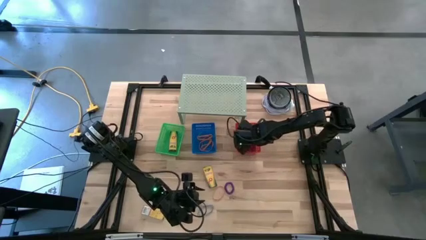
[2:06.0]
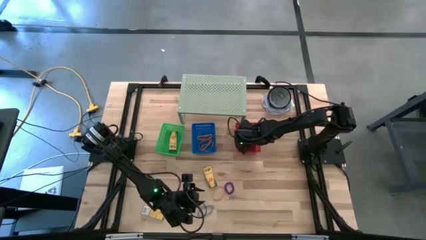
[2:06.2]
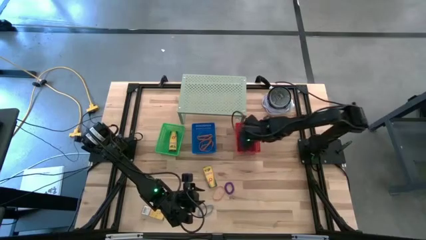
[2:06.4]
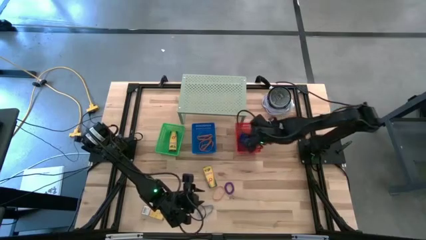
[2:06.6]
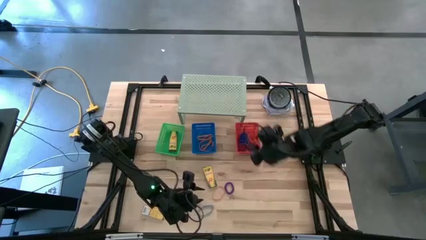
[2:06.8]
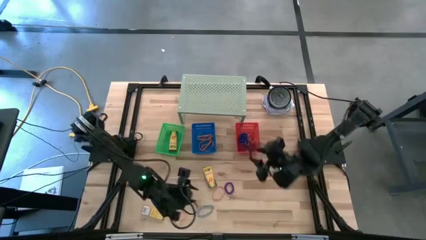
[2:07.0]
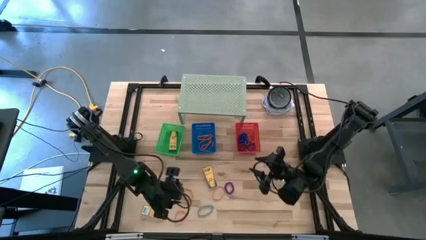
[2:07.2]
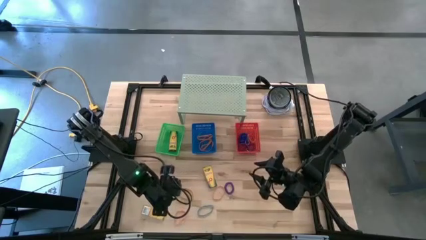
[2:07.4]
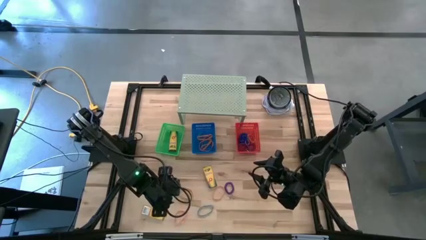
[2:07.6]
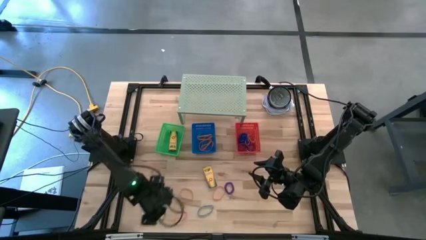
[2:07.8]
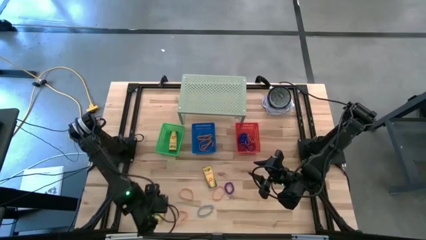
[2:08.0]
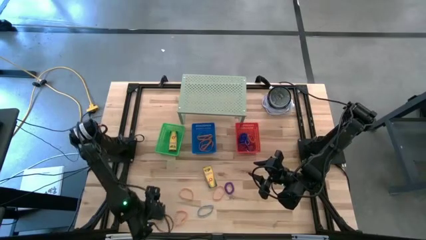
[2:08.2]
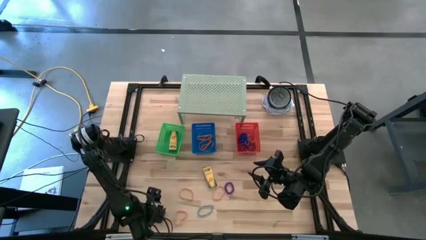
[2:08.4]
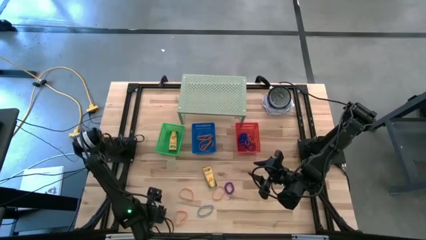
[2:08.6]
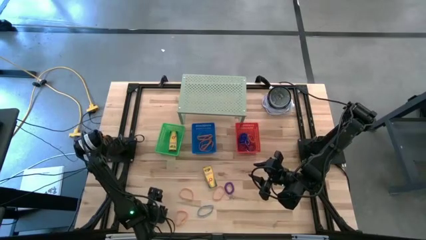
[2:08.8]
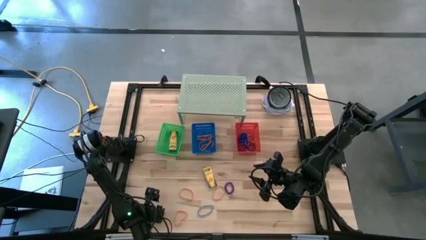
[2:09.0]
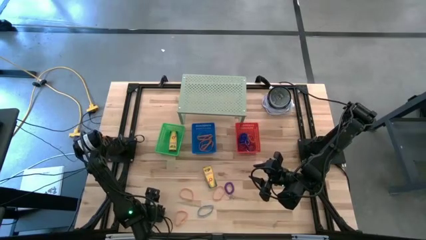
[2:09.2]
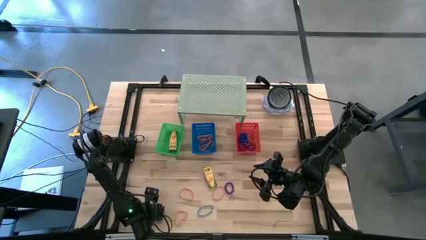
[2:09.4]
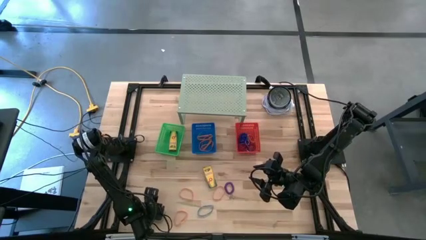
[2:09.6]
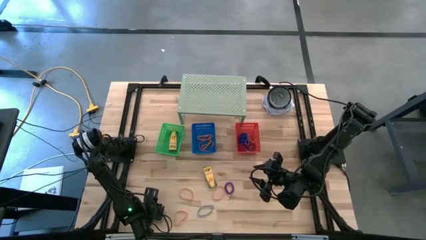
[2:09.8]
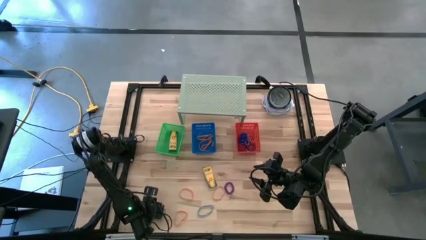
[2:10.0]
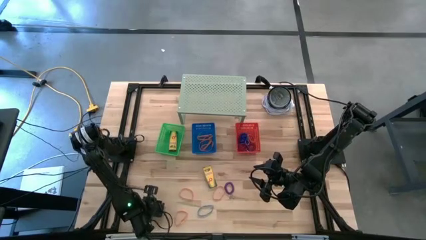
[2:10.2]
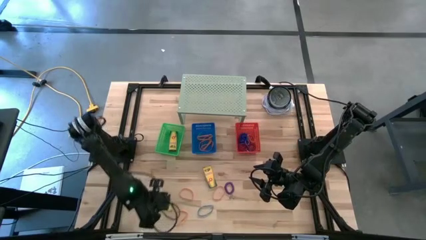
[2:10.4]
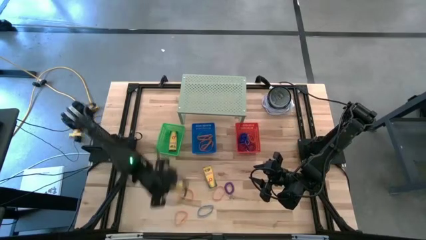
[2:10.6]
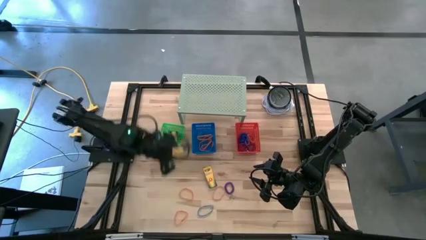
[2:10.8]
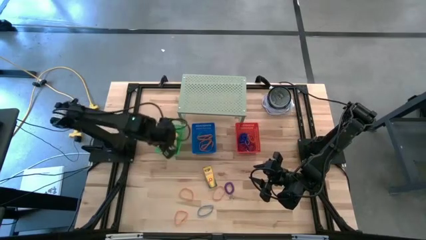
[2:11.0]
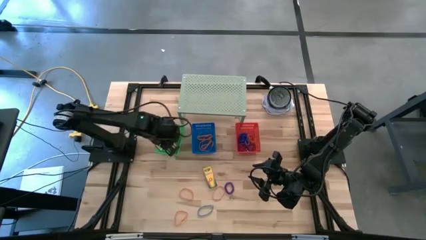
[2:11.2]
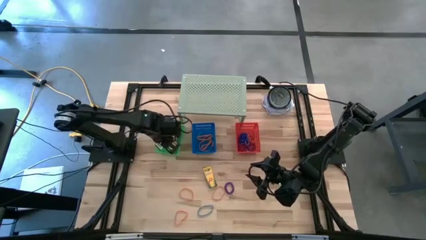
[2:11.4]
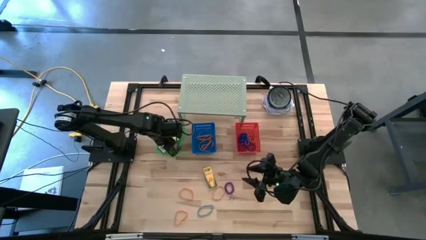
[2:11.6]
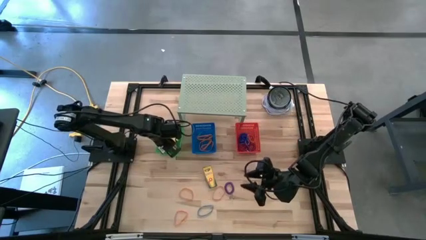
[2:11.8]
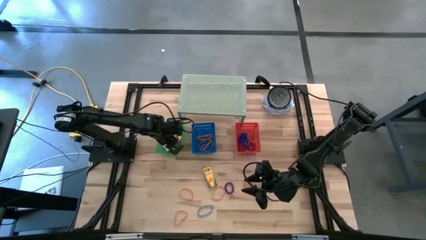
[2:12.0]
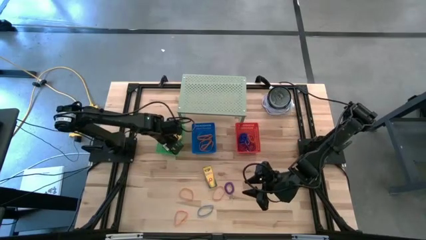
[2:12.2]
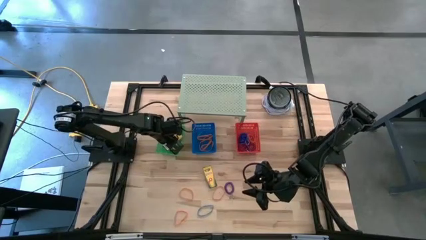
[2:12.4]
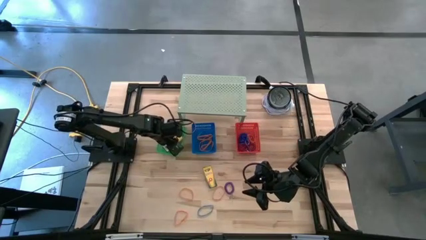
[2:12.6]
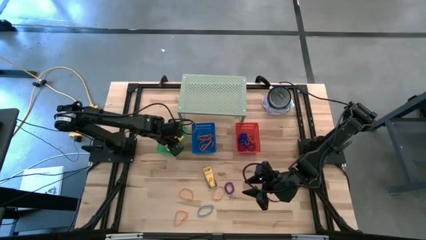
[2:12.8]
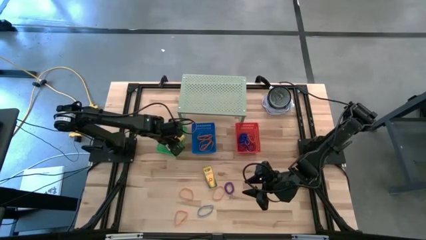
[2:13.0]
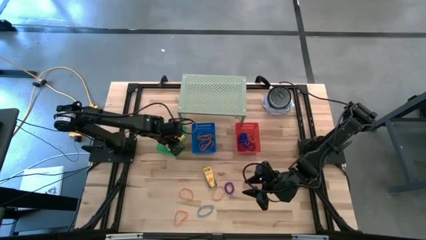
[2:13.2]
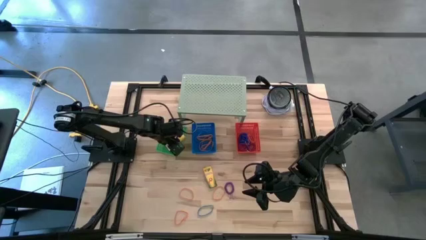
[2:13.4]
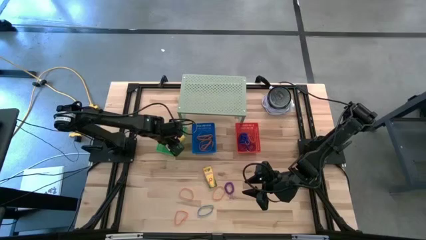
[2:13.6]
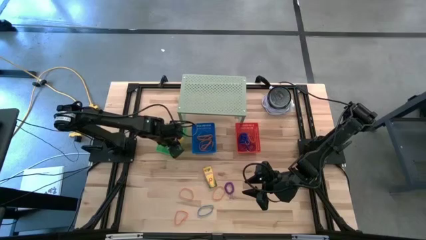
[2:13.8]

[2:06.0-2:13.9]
Task: Pick & Place Office Desk Supplies
Put the crayon box into the green bin

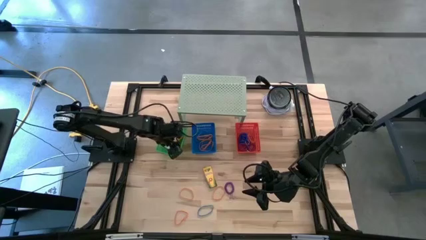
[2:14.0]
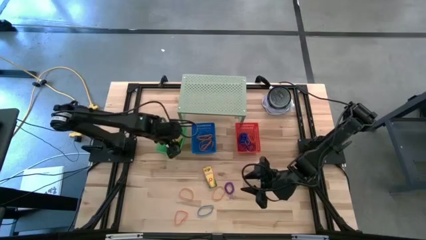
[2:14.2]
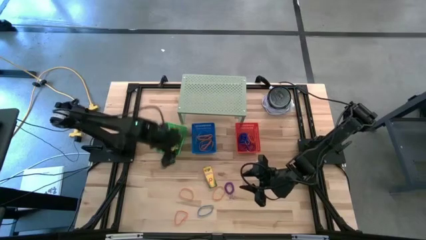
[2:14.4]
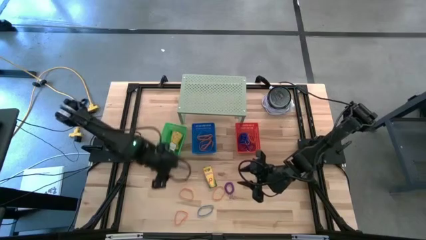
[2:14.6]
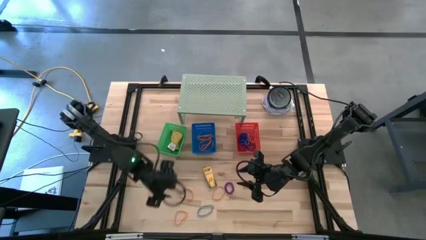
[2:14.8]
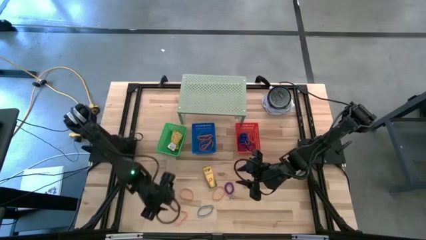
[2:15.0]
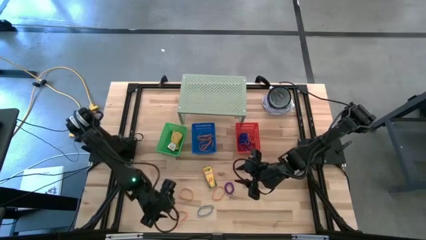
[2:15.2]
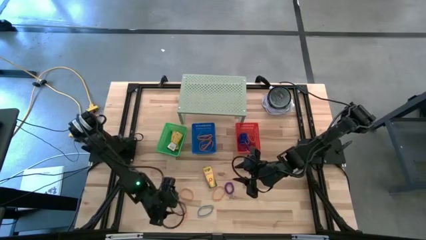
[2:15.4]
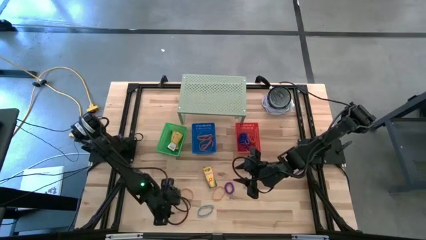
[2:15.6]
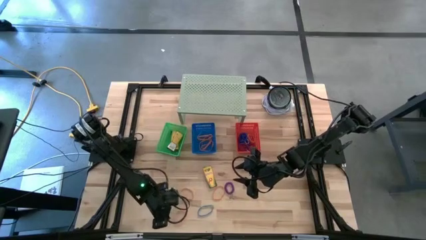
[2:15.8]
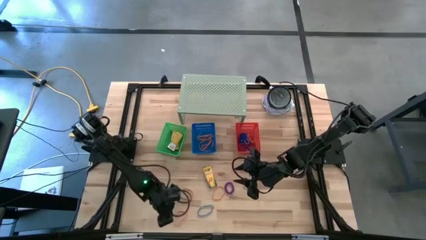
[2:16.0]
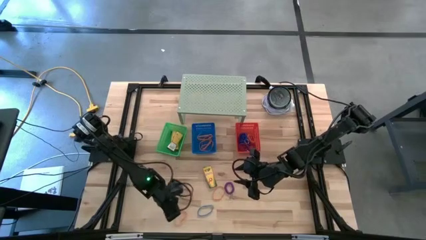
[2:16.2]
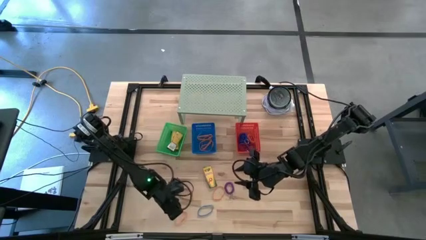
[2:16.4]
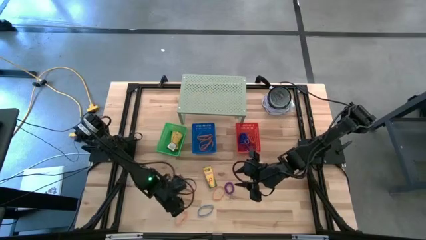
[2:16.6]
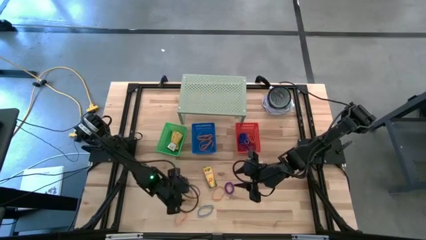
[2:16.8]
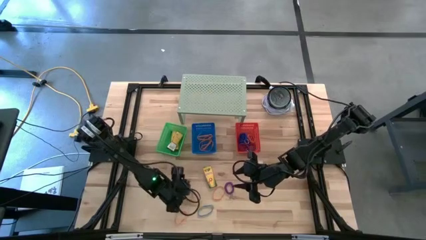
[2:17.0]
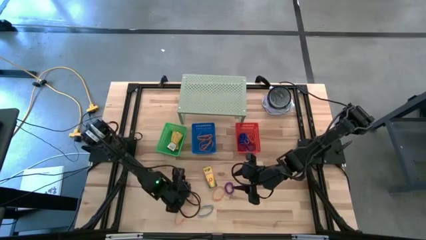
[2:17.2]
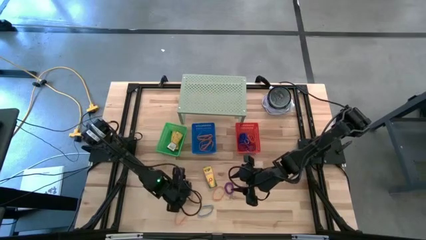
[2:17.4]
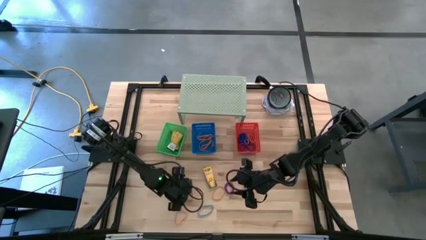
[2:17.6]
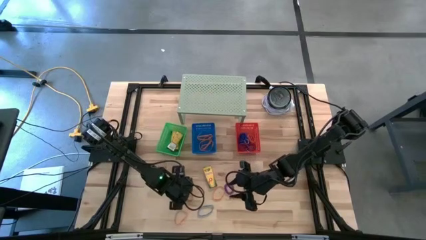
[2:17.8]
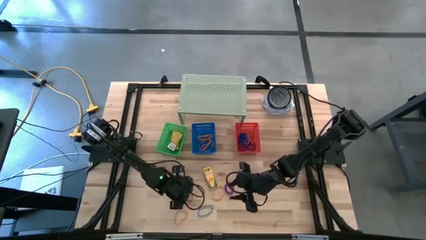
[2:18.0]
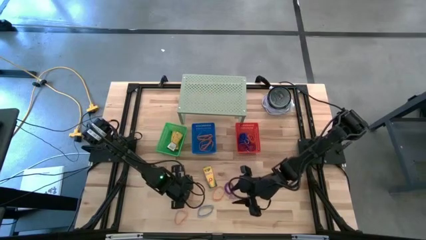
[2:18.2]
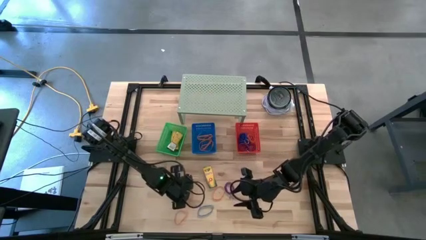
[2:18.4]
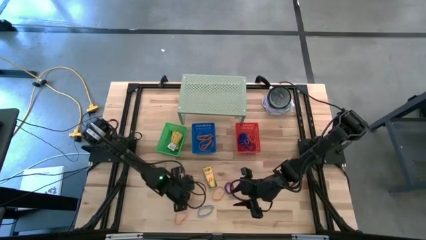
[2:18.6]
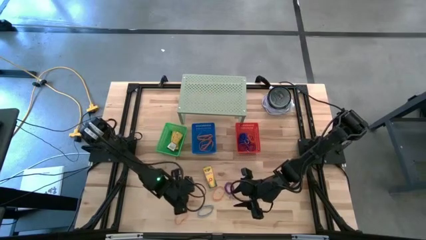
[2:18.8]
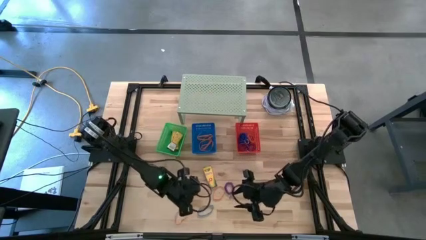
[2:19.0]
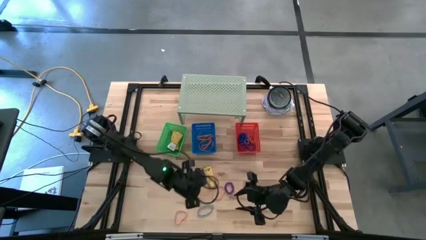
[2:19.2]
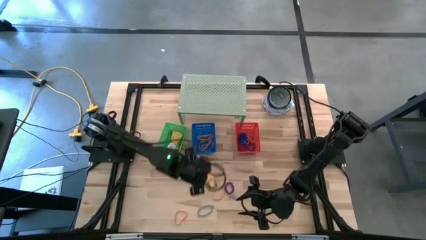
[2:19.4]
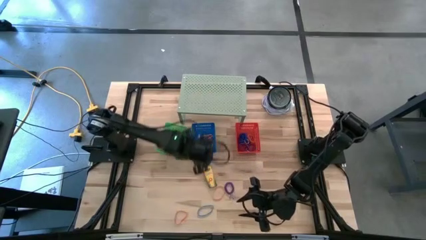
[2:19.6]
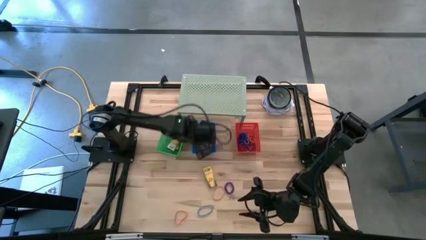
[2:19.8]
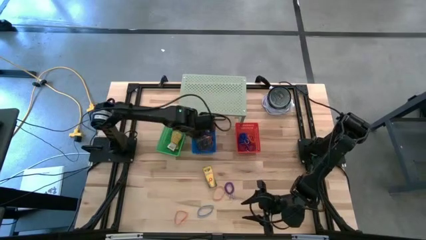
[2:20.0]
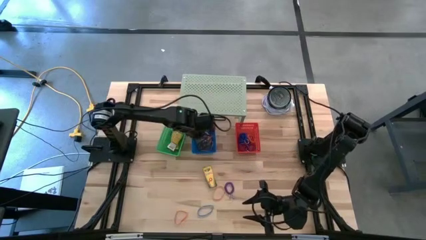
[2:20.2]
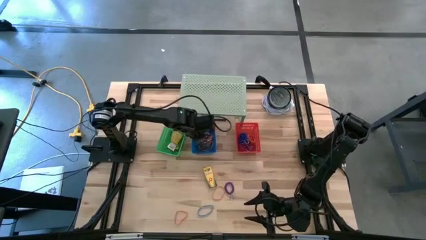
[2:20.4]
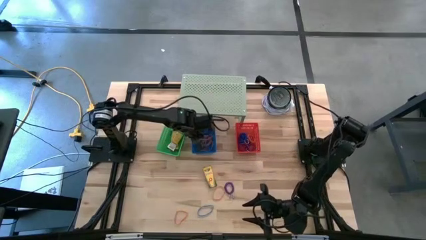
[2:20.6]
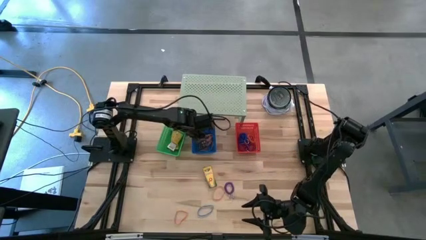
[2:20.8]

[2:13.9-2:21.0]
Put the orange rubber band into the blue bin

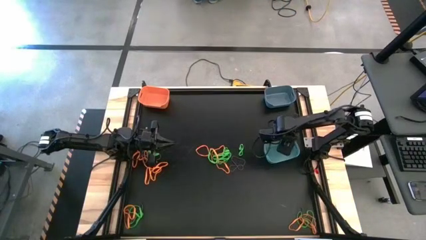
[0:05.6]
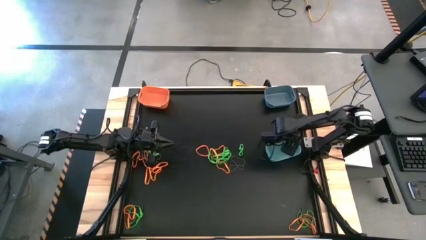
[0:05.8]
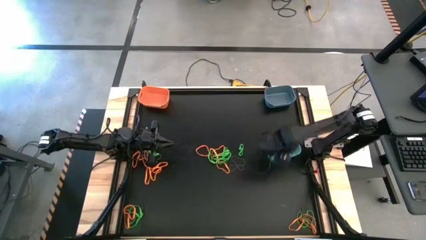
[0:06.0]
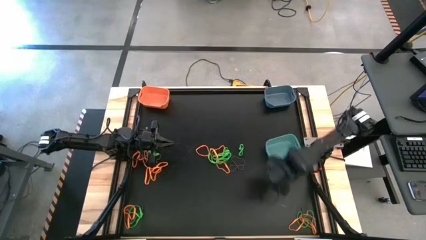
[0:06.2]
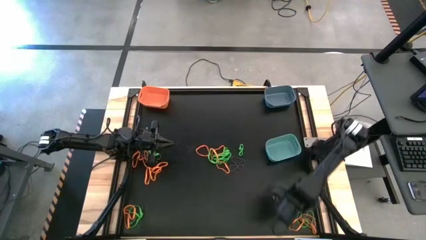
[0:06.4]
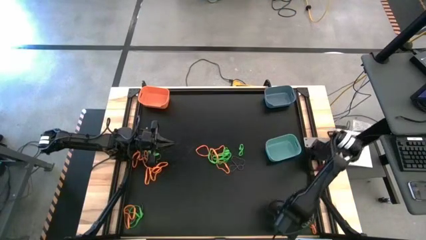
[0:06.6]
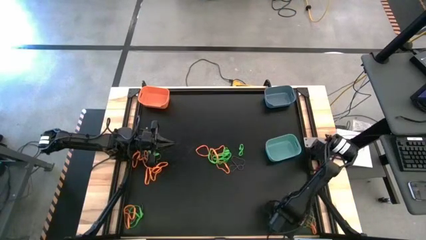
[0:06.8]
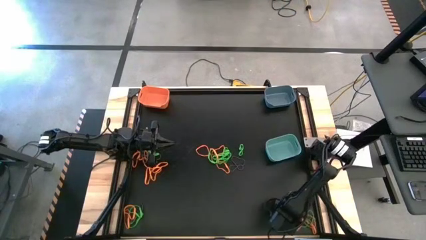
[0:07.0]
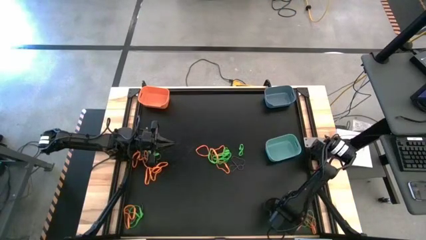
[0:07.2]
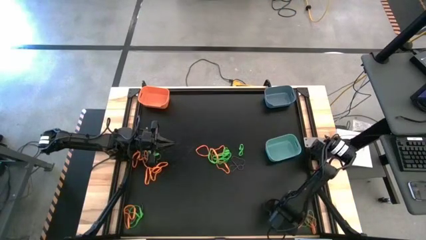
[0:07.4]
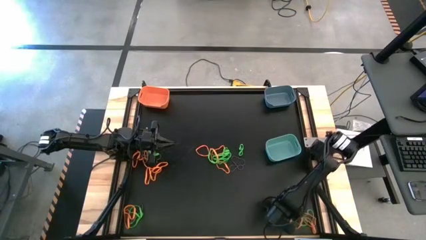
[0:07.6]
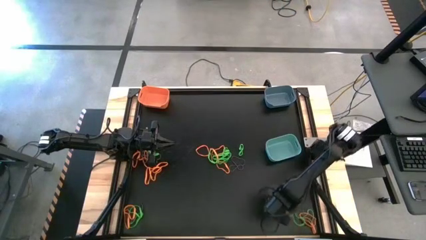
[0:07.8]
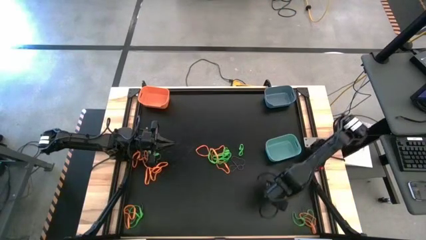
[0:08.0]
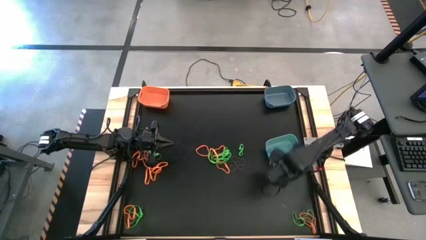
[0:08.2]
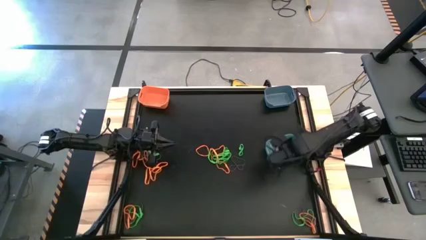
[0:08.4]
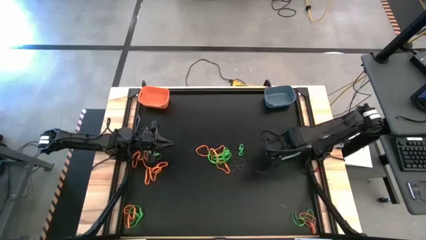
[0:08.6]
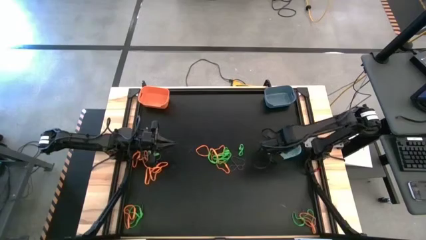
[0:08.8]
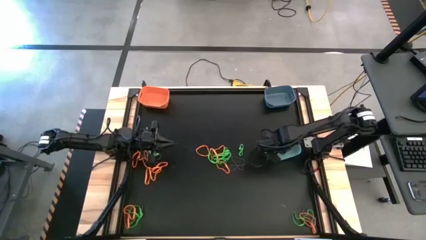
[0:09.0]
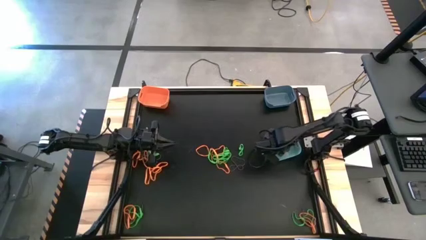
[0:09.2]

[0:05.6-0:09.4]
Task: Sort rubber bands into baskets
Put the orange rubber band into the green bin
